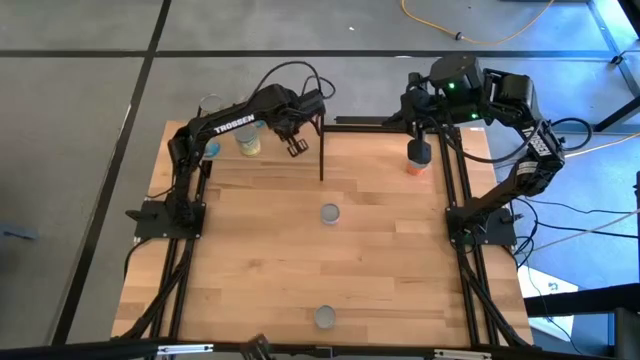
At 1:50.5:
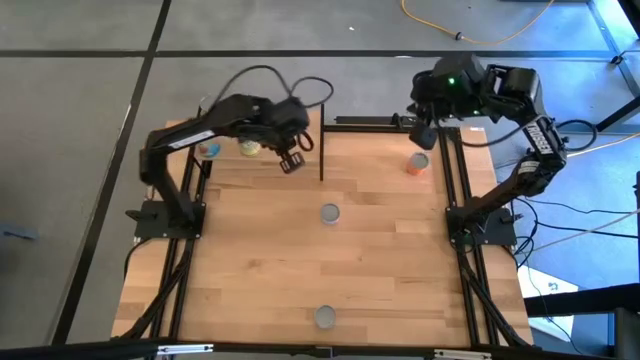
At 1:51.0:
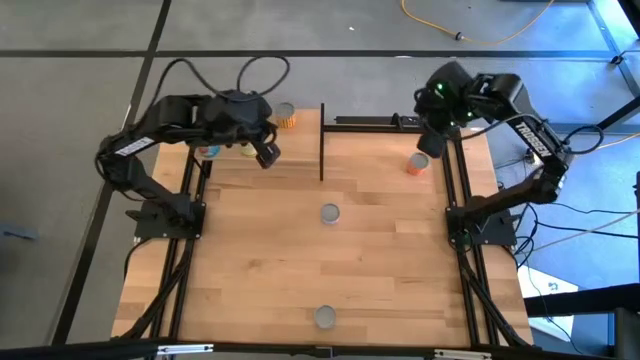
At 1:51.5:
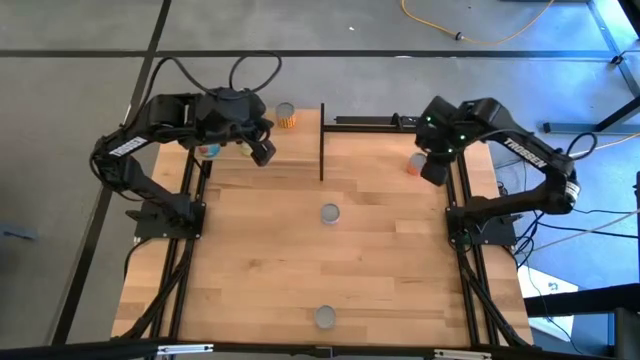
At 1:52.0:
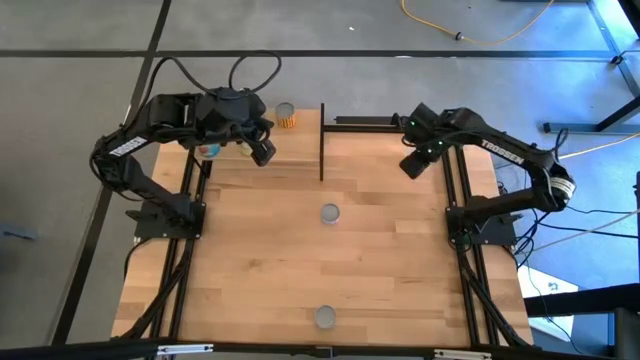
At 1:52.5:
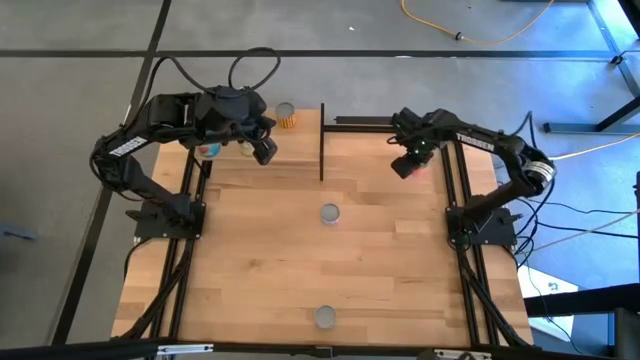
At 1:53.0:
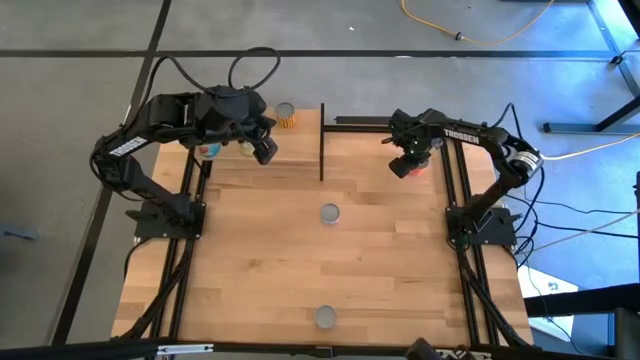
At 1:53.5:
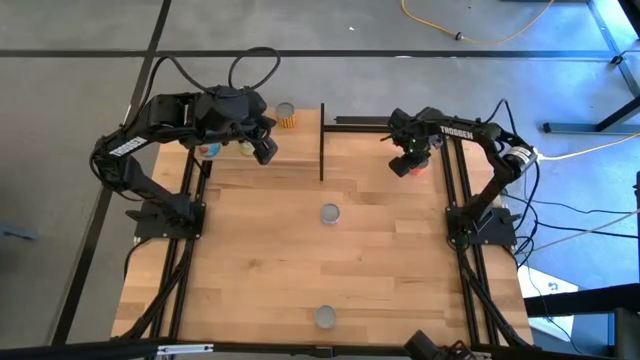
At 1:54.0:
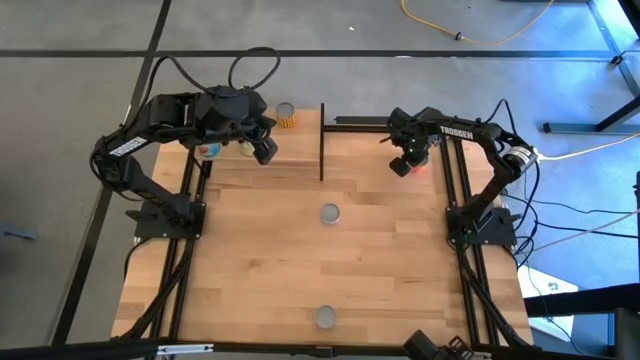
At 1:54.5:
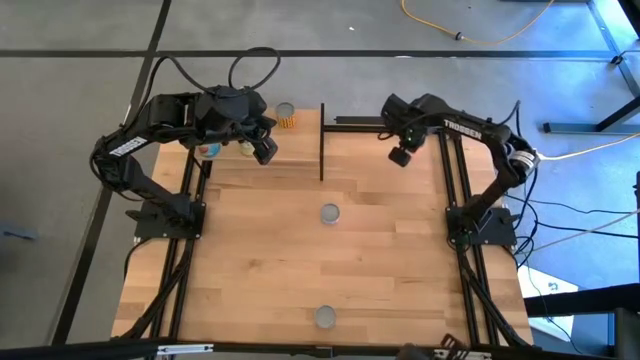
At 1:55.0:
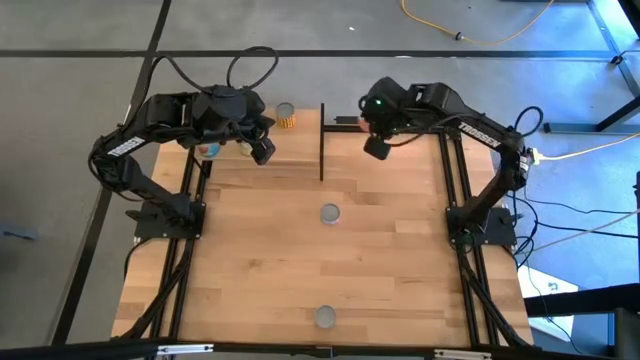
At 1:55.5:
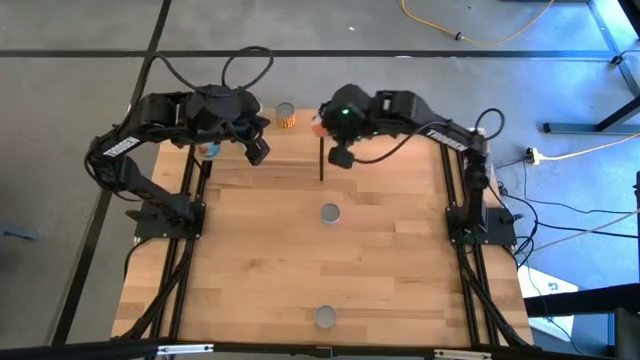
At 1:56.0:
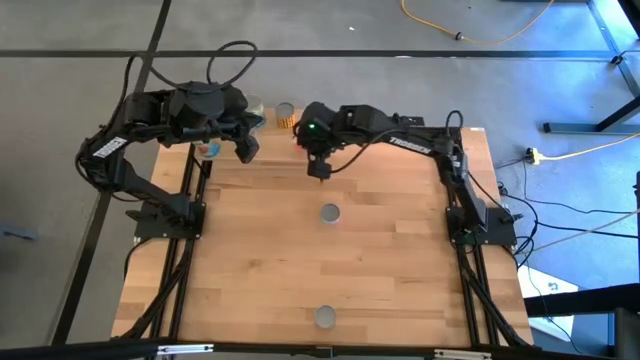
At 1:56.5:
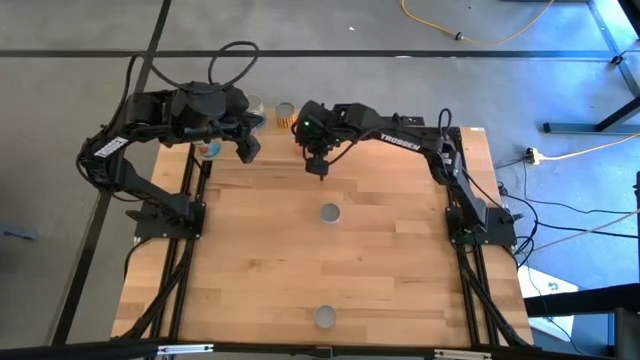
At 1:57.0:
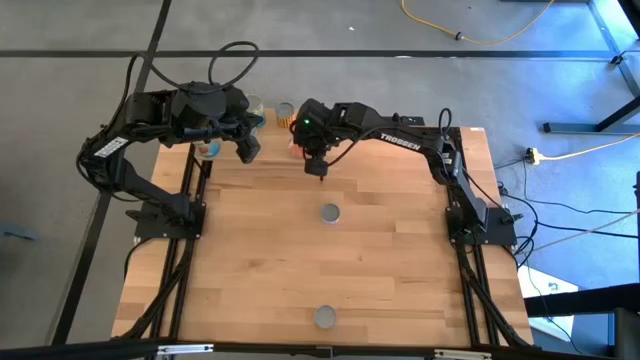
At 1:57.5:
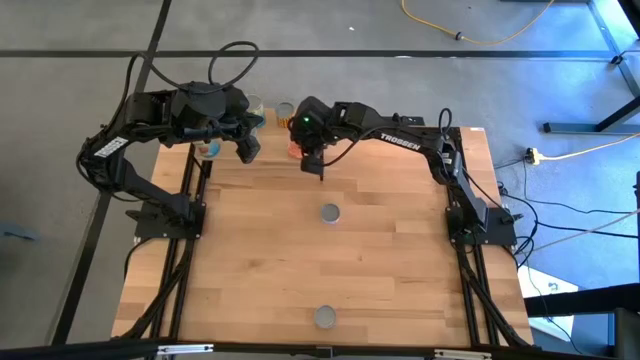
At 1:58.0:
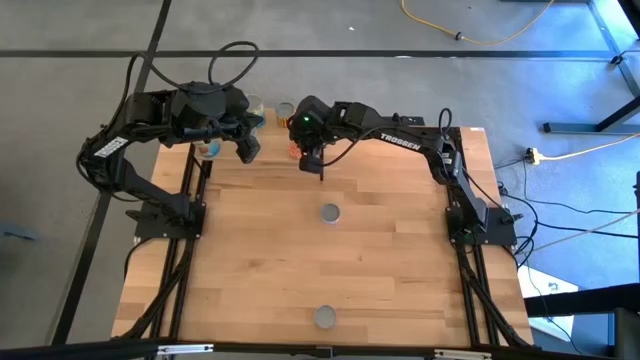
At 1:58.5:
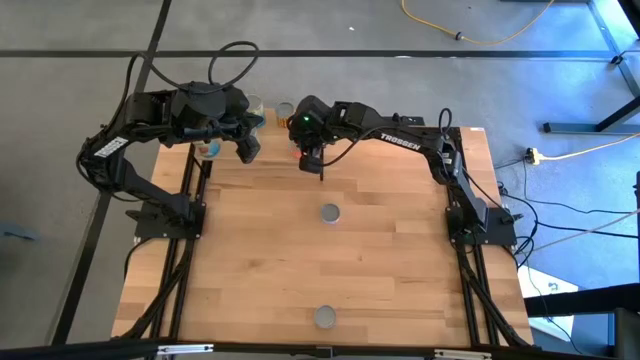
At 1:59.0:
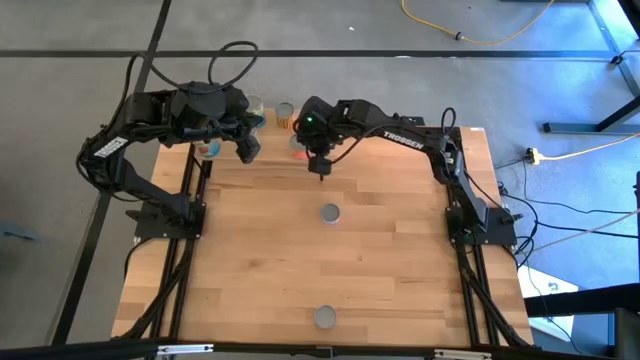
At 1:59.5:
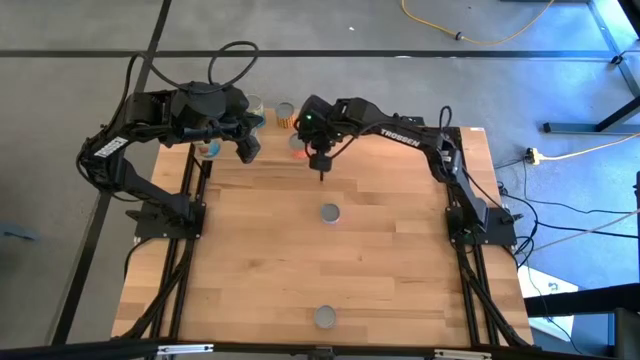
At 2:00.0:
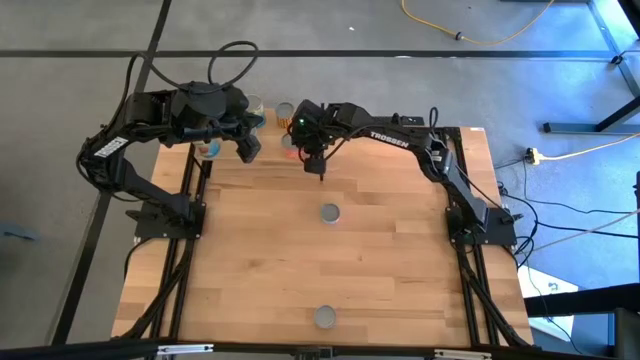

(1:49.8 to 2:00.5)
Task: Pick and place cans onto a shelf
Put the orange can on the shelf aligned with the other yellow canned beans

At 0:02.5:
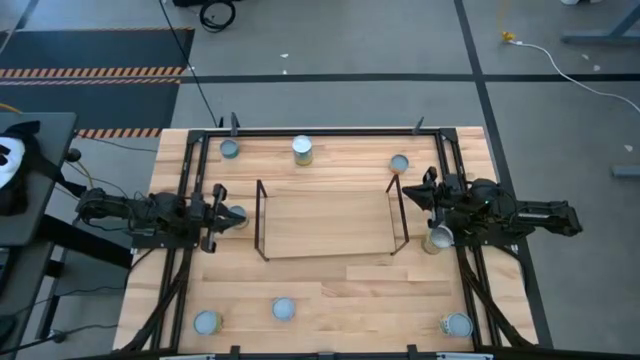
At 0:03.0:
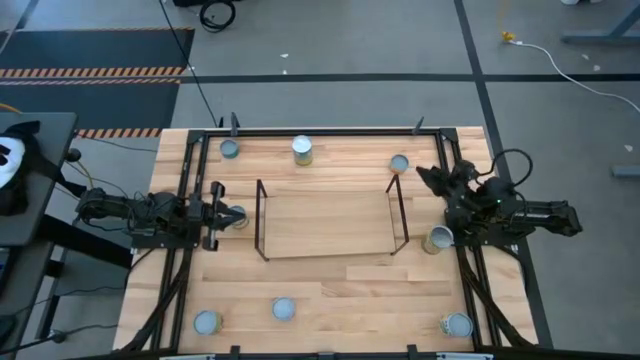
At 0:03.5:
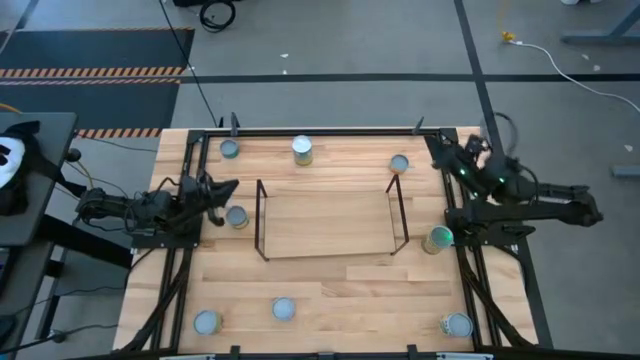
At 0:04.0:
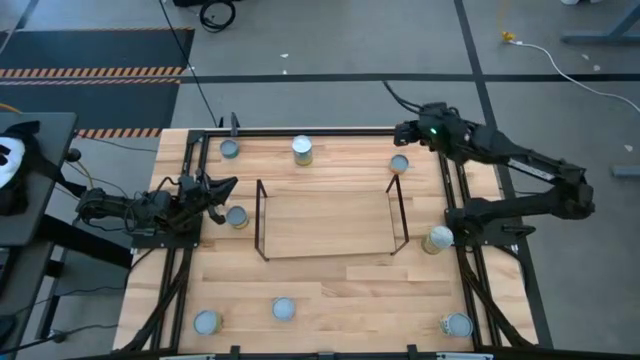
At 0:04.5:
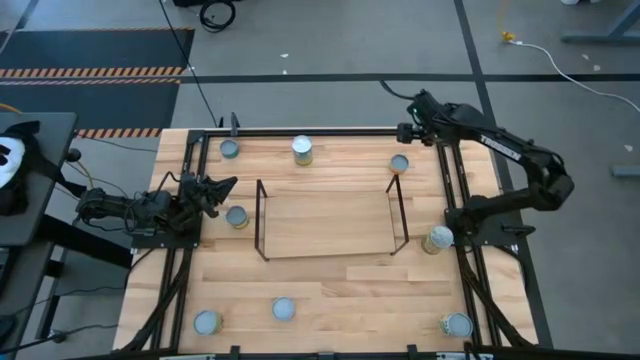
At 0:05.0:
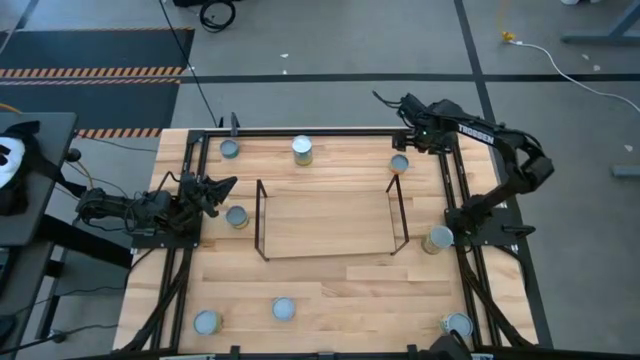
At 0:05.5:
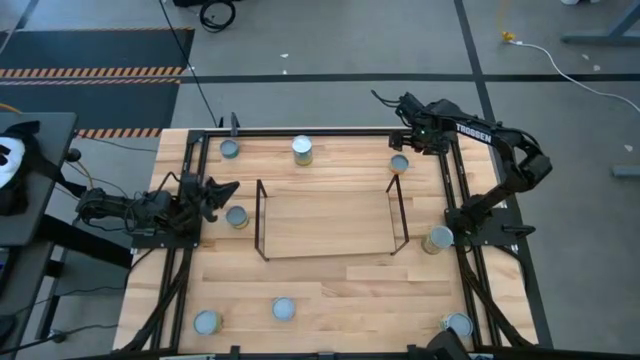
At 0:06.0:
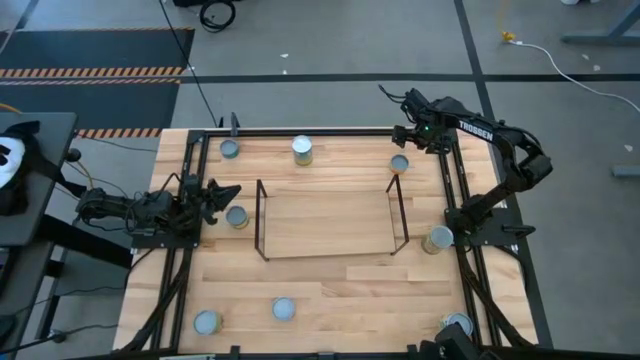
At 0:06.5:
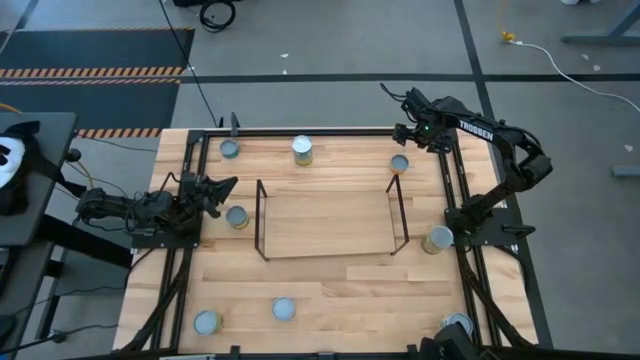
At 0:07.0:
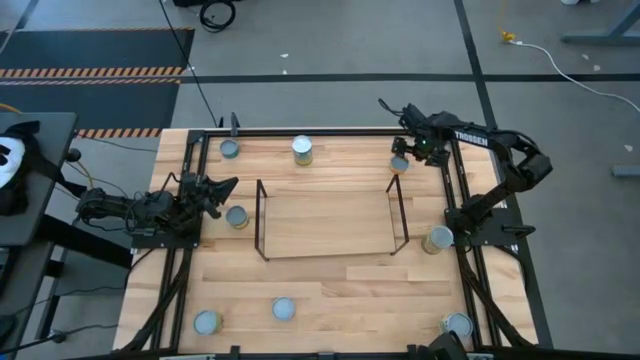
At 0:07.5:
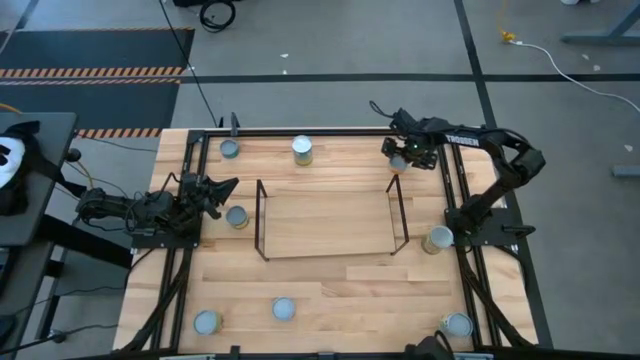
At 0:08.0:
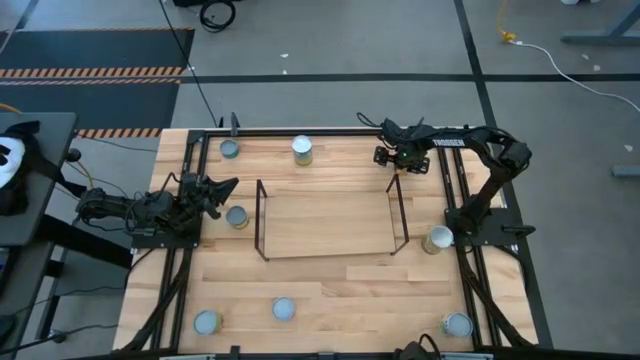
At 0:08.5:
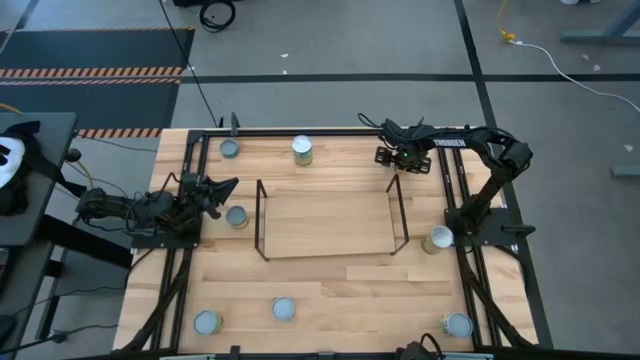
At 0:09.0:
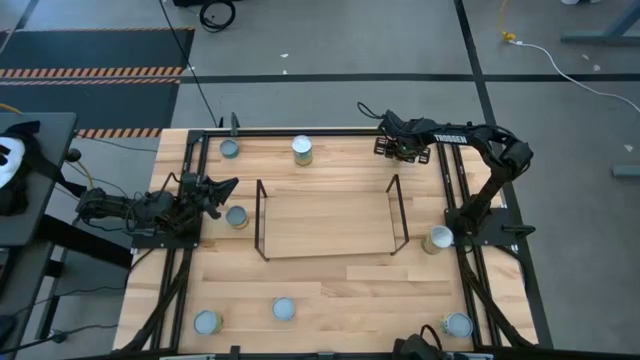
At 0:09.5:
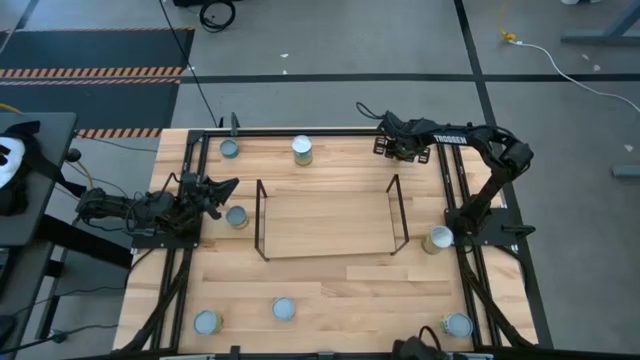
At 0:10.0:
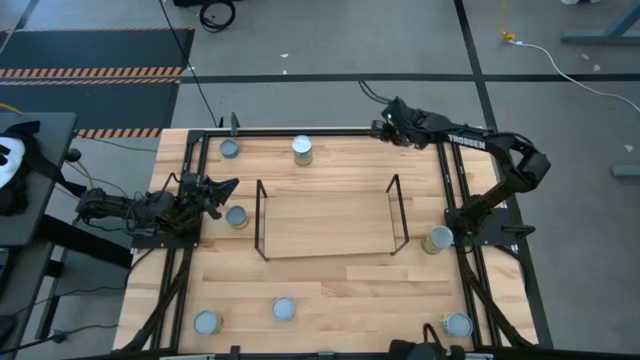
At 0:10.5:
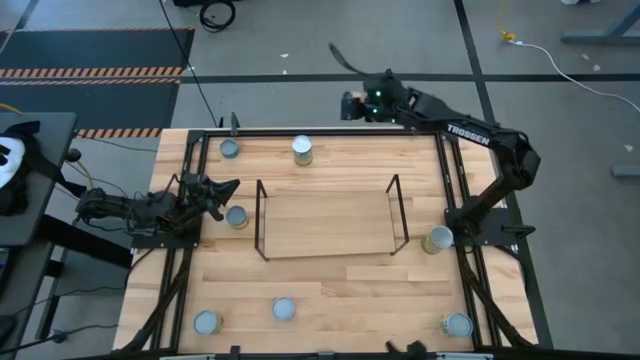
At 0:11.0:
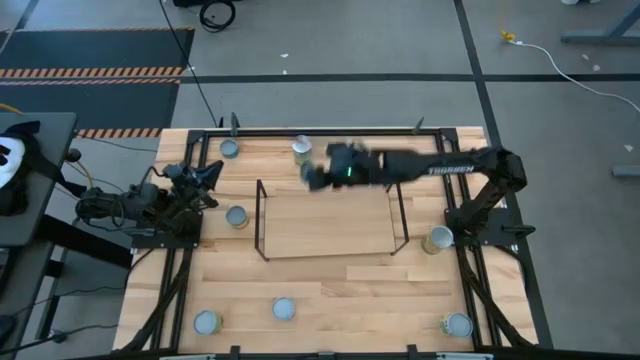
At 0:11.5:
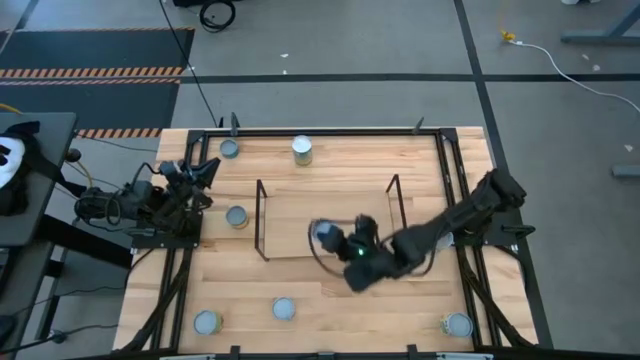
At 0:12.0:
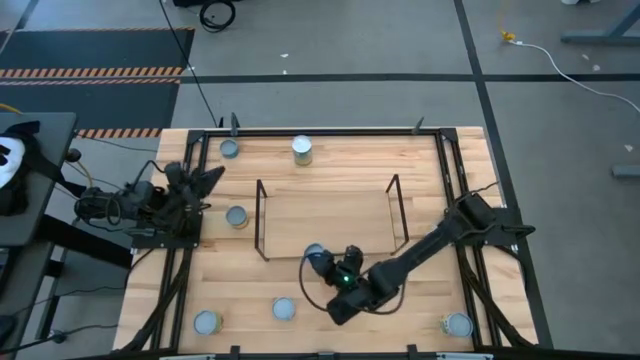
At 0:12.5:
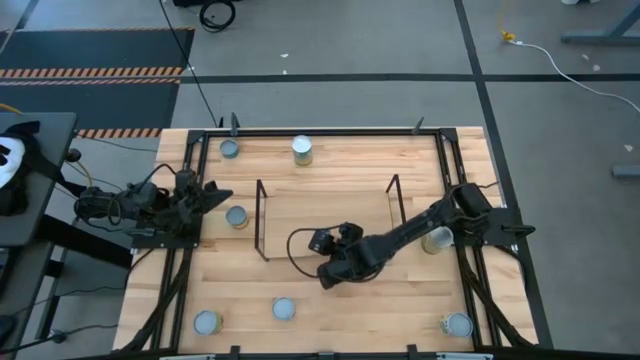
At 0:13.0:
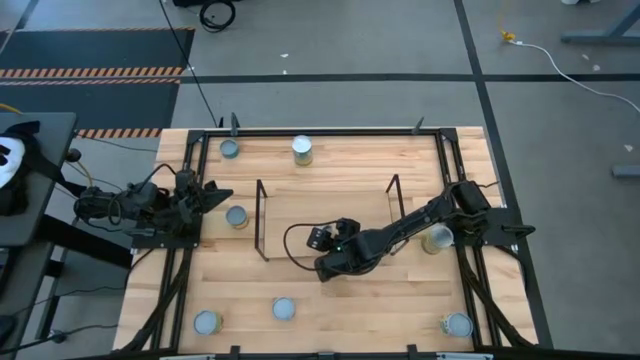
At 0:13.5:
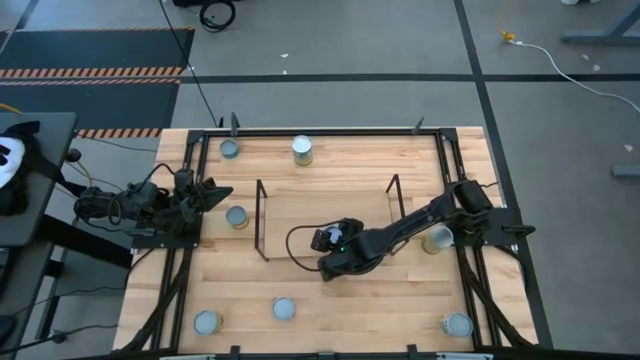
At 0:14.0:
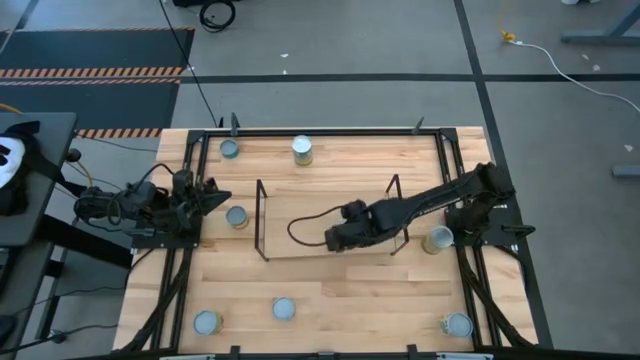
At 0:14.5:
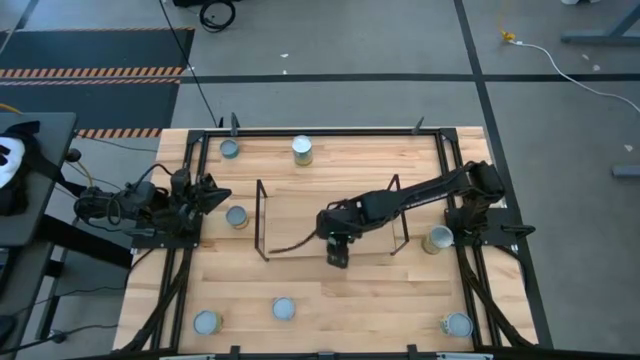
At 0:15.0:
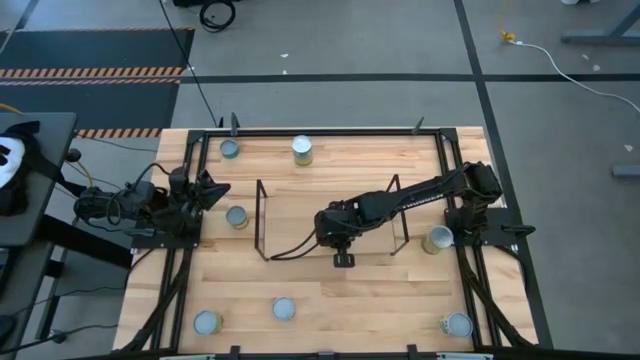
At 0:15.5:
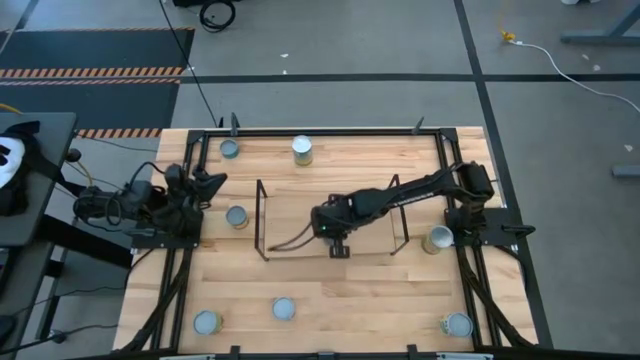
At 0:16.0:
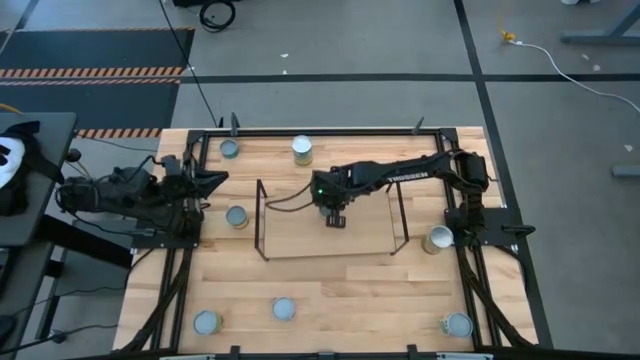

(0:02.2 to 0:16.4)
Task: Pick and place cans onto a shelf
Put the canned mushroom on the shelf
